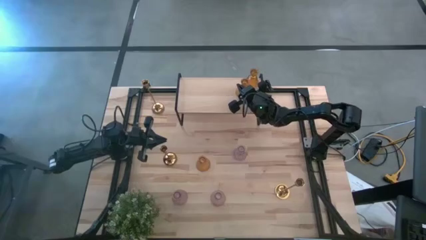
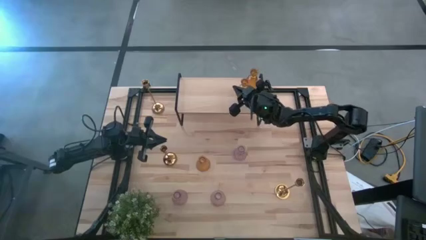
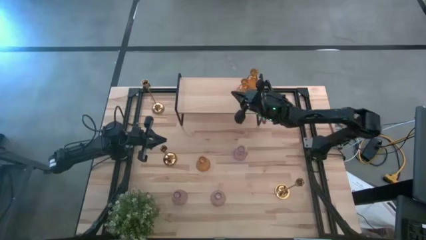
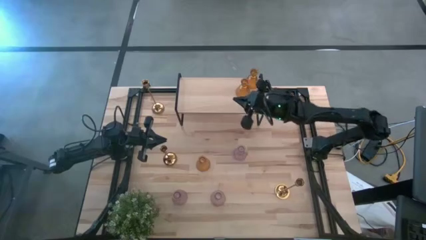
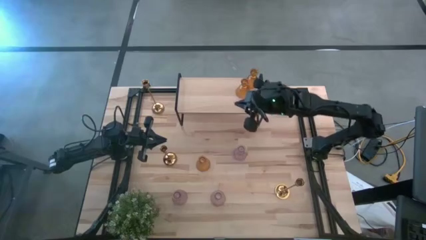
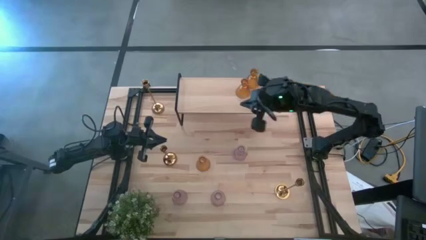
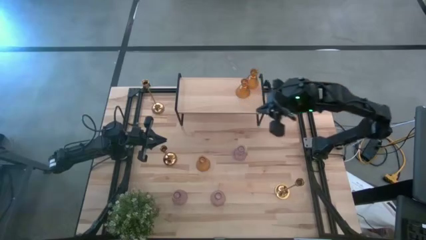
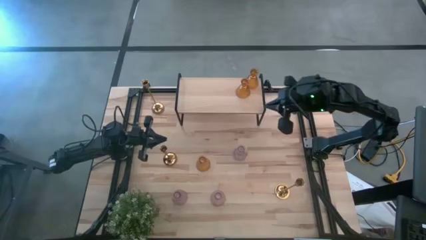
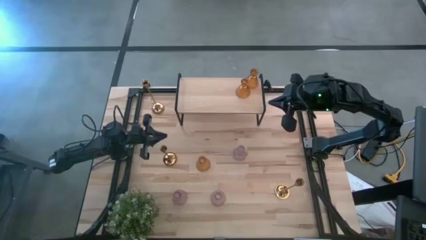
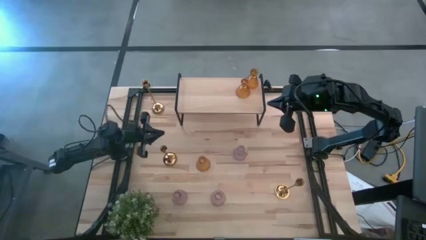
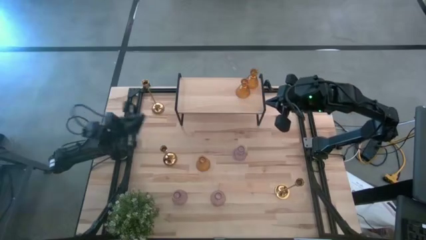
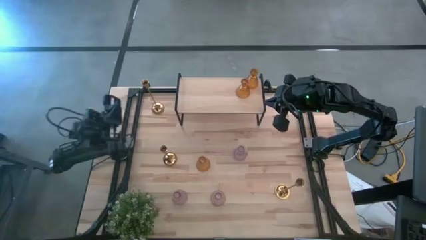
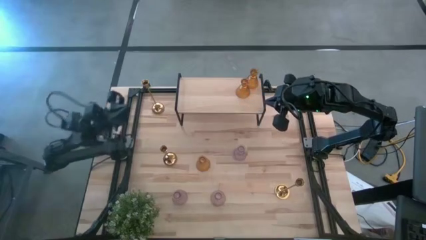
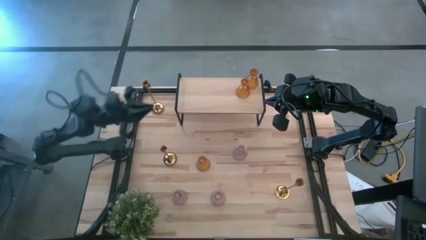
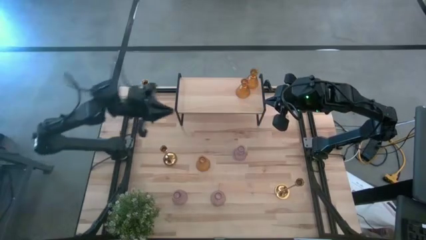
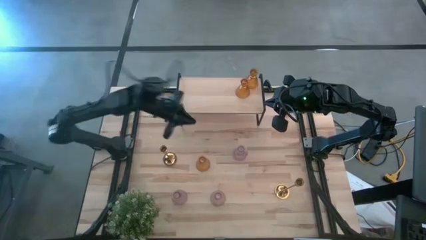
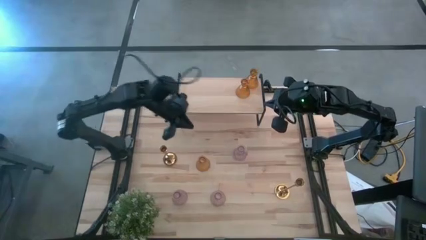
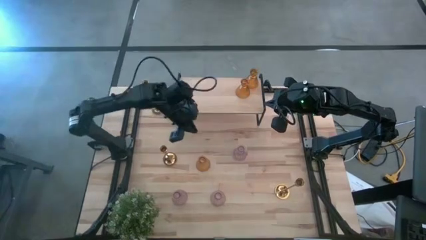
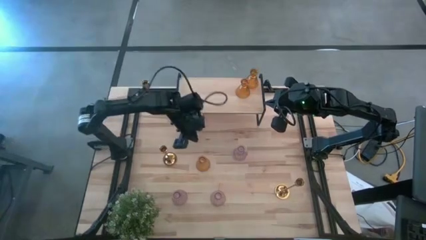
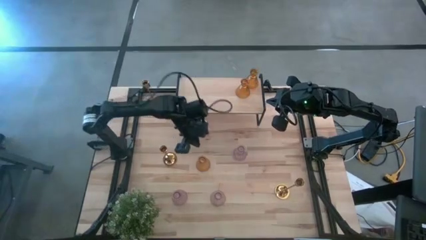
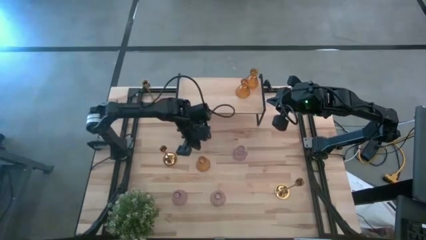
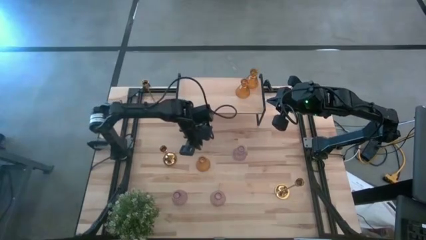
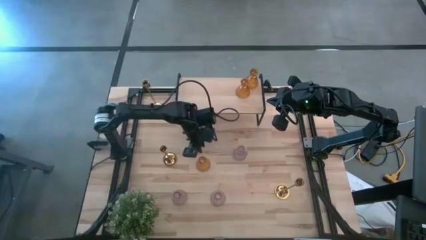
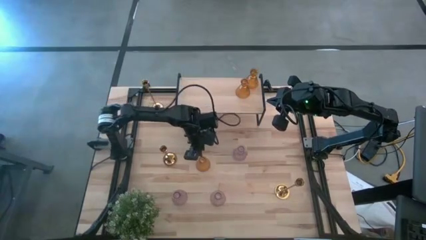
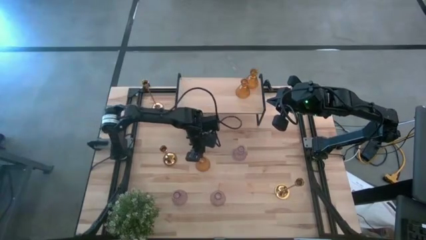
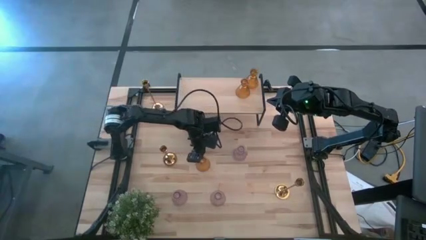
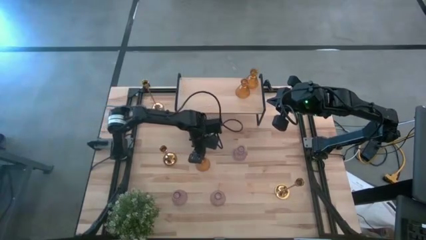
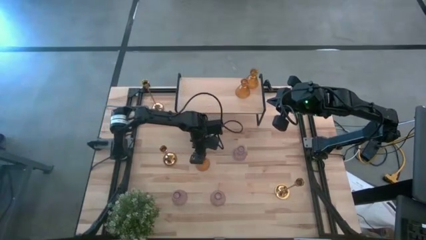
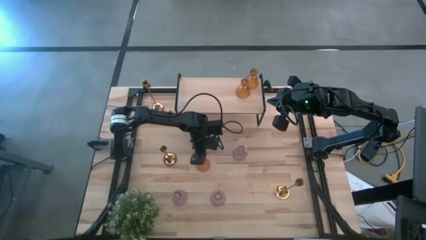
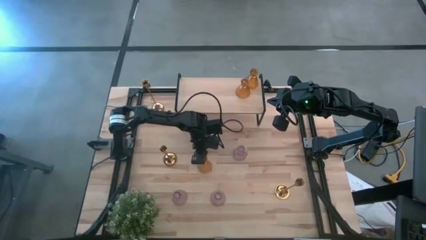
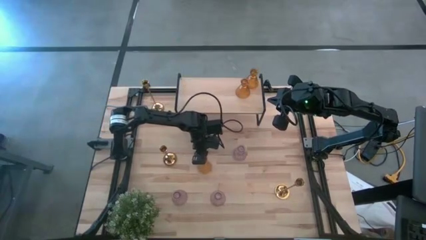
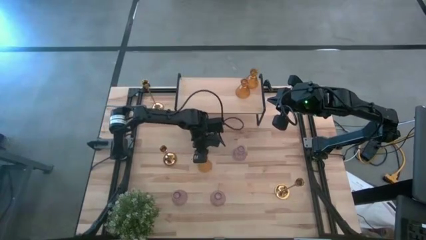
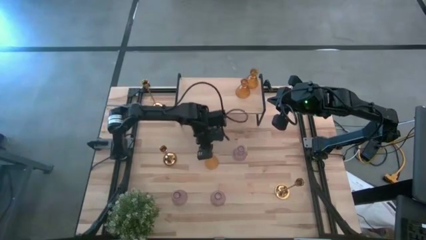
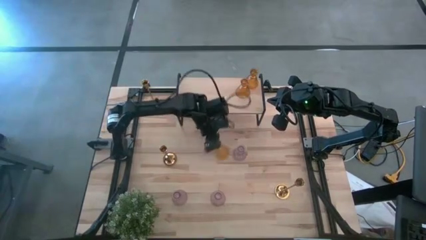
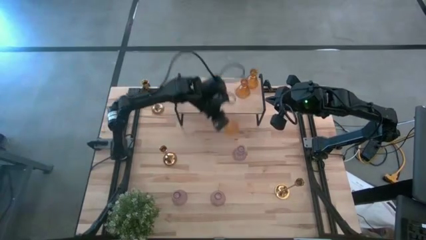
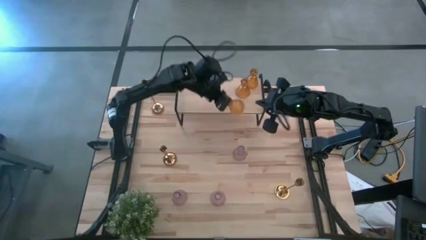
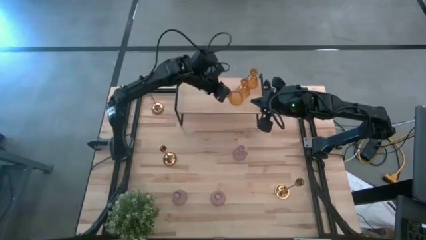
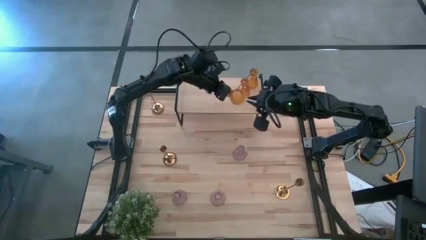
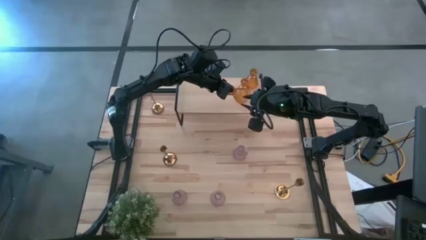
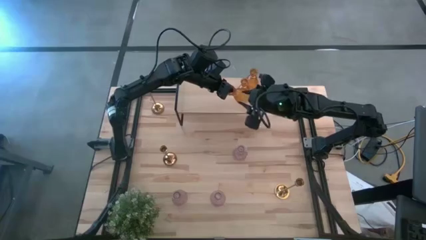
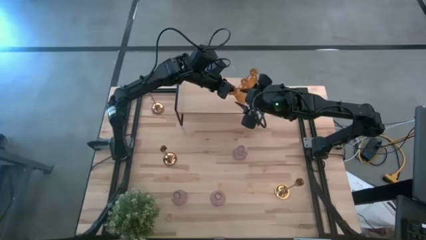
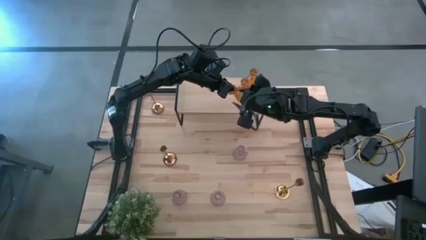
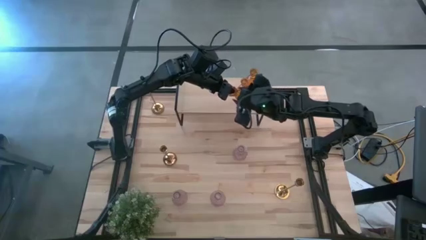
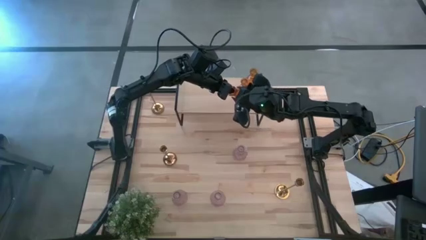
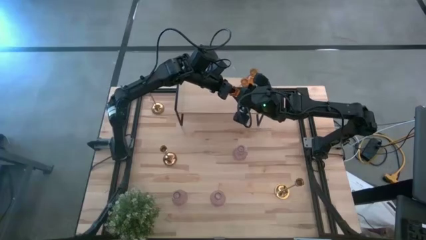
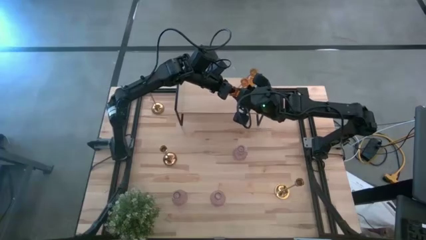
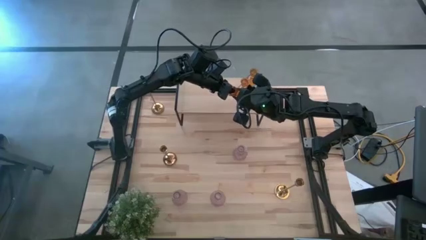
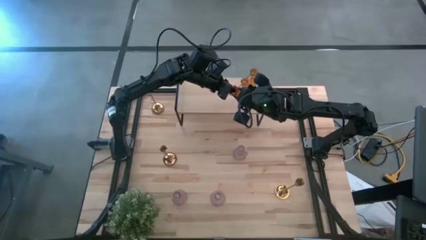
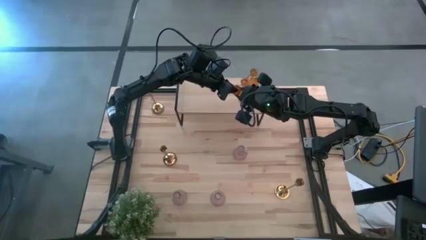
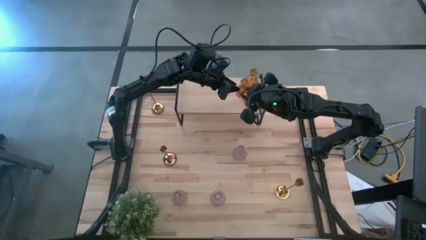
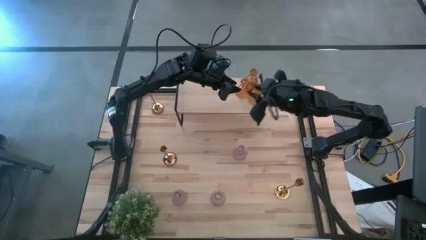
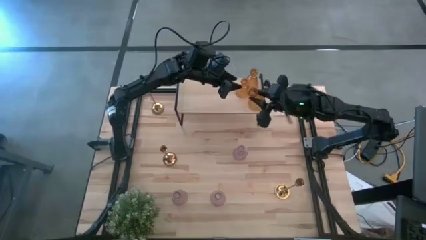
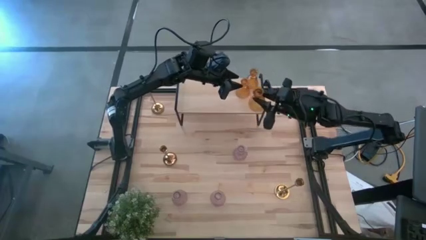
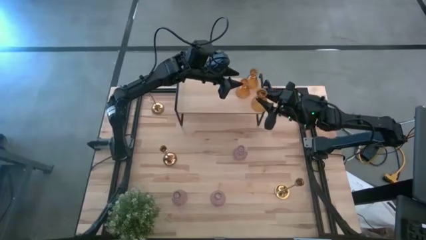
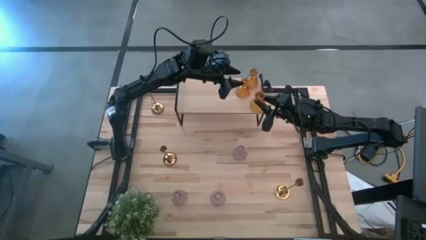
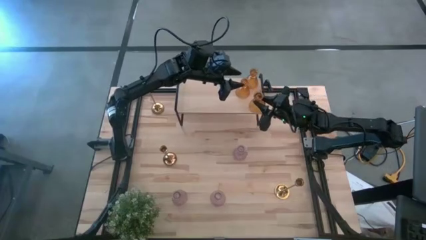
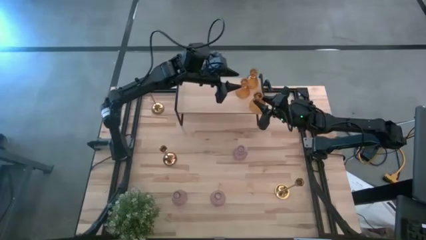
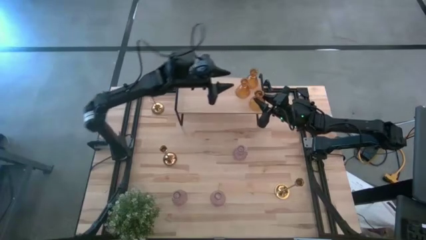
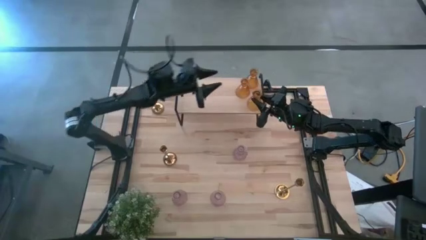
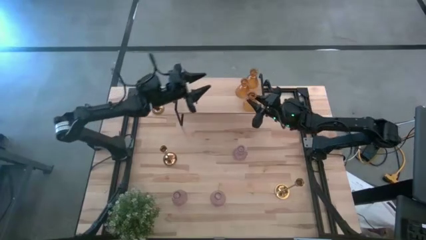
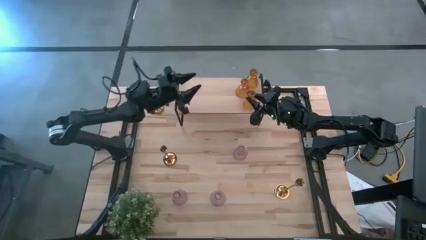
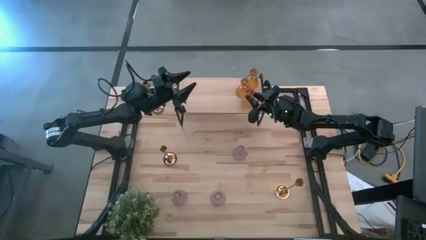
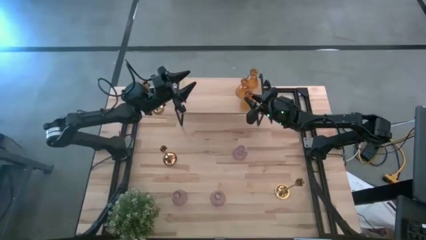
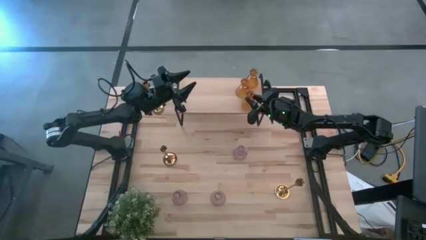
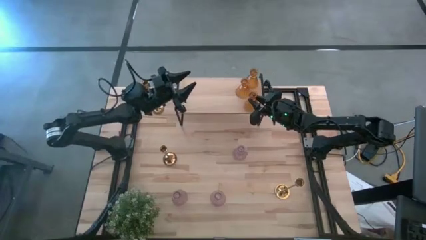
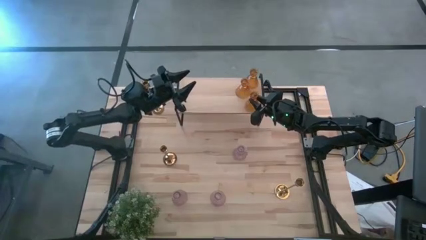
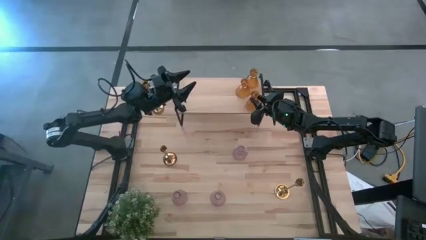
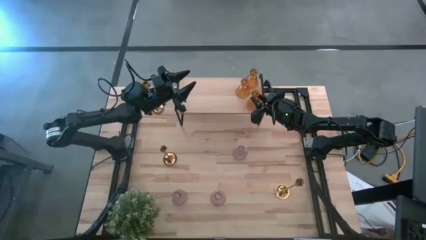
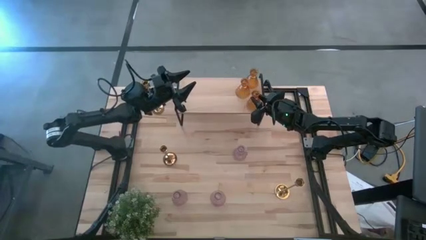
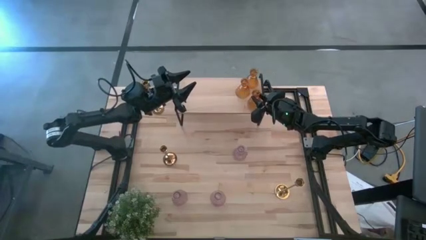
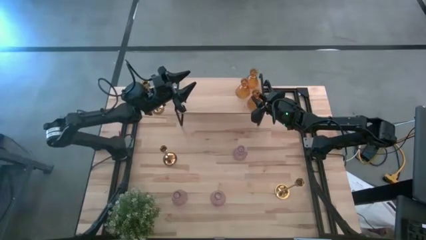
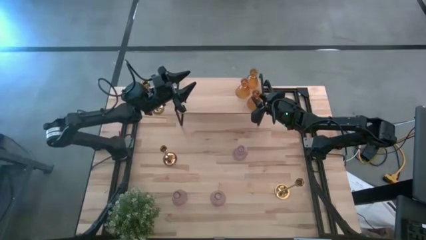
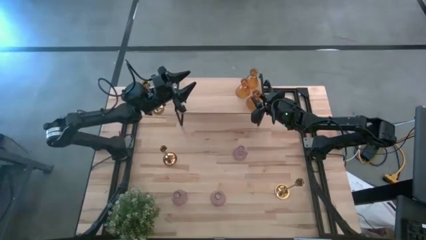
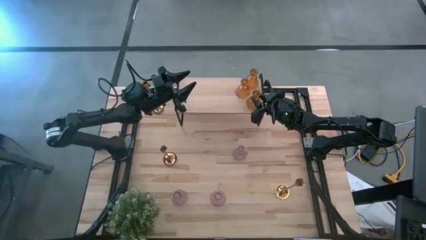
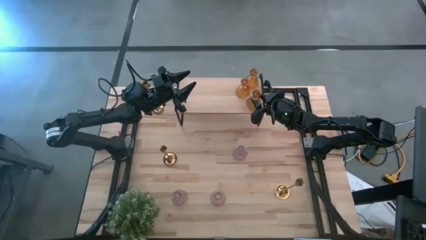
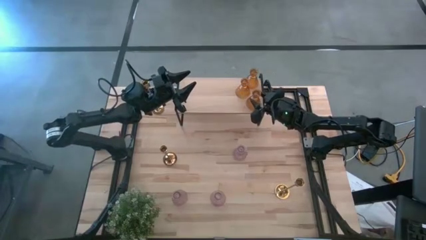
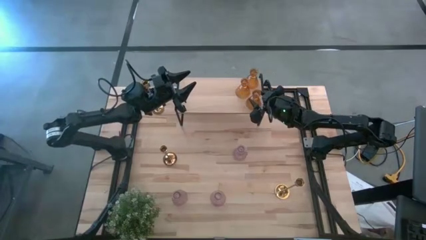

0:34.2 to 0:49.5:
Task: Pick & Place candle stick holders
Align the yellow glass candle holder with the other yellow glass candle holder on the shelf
